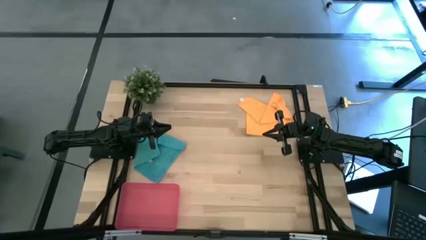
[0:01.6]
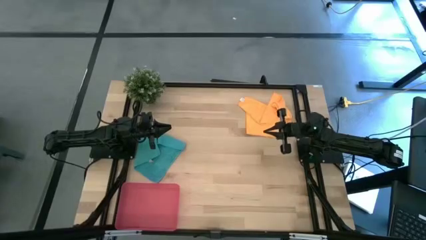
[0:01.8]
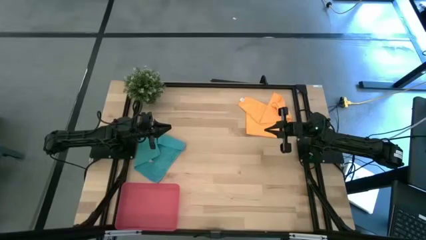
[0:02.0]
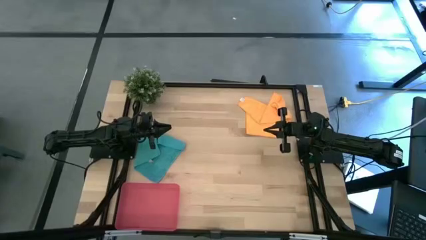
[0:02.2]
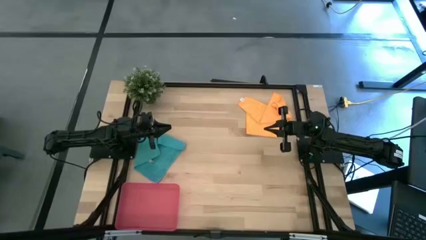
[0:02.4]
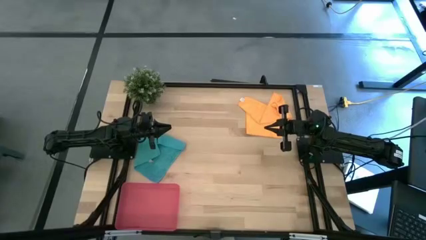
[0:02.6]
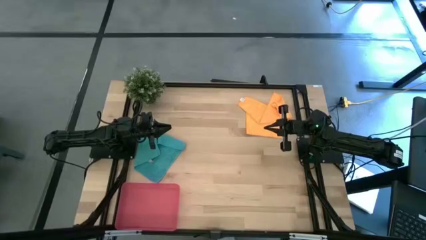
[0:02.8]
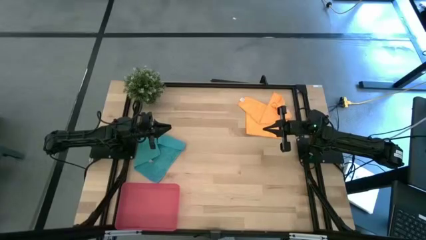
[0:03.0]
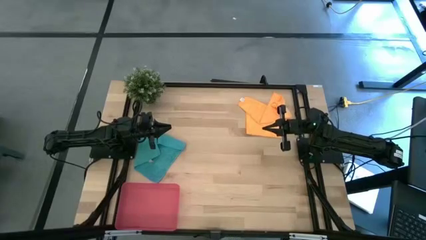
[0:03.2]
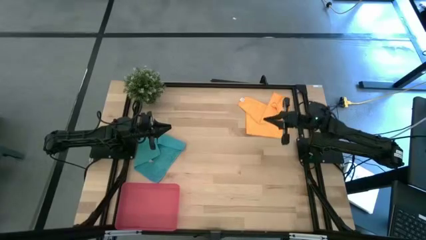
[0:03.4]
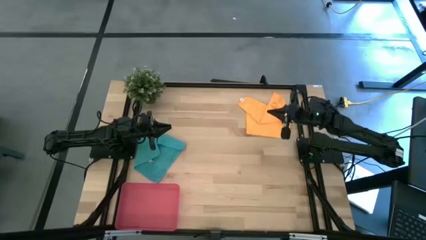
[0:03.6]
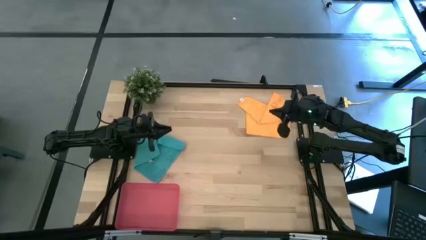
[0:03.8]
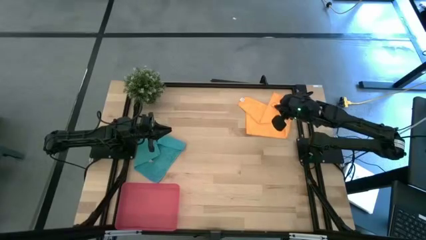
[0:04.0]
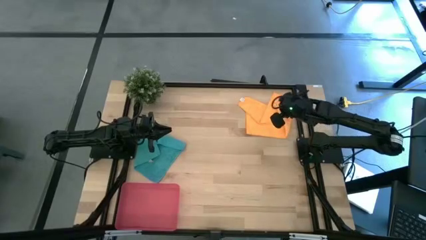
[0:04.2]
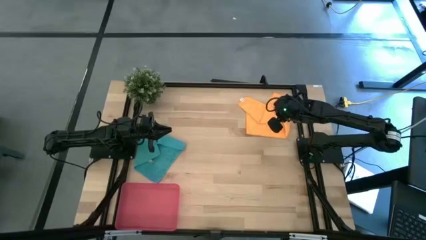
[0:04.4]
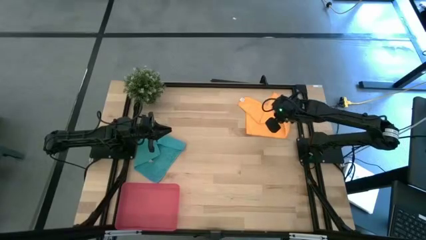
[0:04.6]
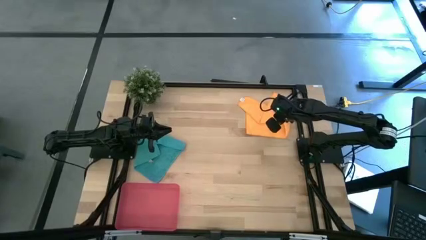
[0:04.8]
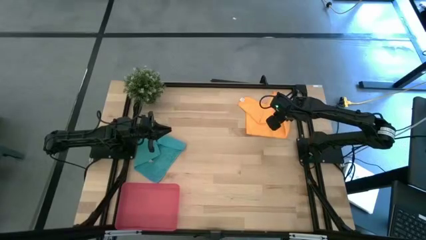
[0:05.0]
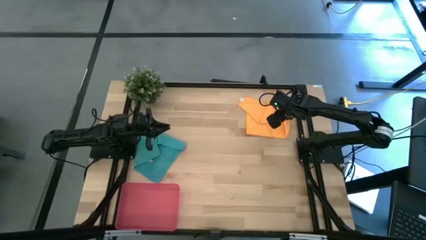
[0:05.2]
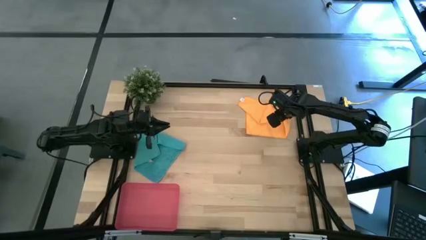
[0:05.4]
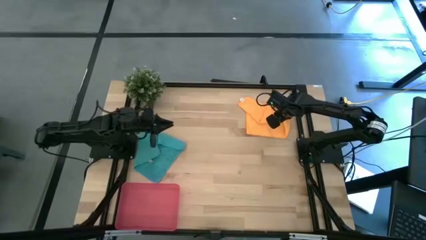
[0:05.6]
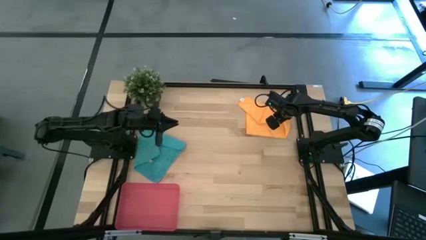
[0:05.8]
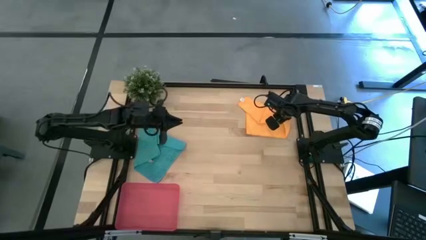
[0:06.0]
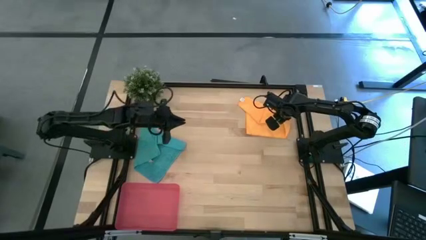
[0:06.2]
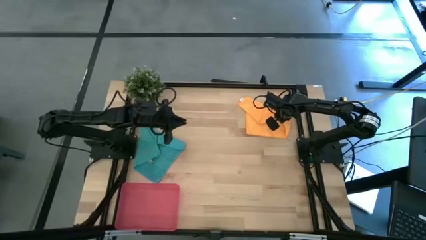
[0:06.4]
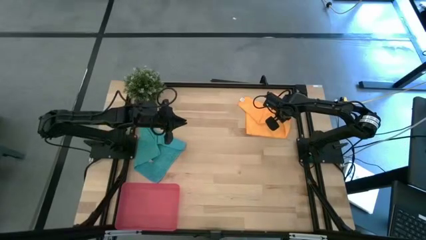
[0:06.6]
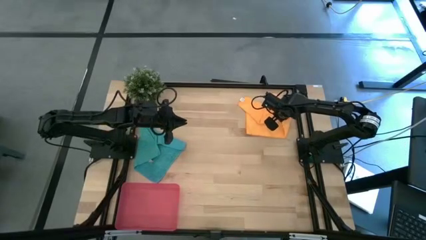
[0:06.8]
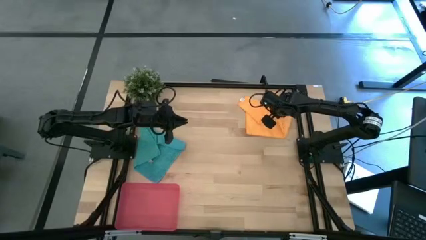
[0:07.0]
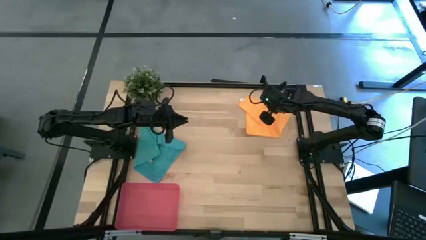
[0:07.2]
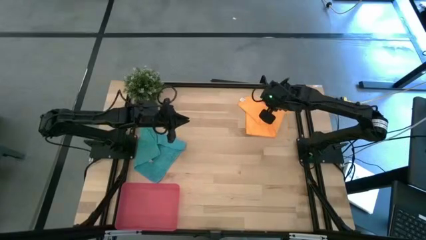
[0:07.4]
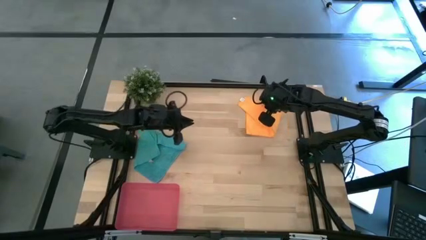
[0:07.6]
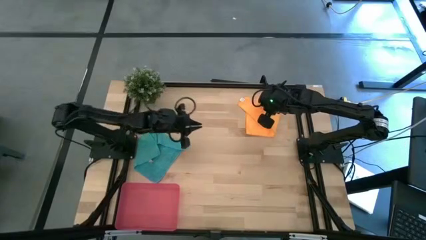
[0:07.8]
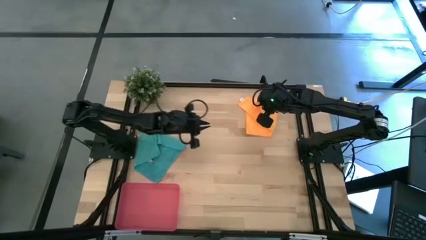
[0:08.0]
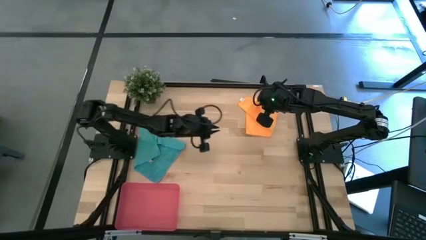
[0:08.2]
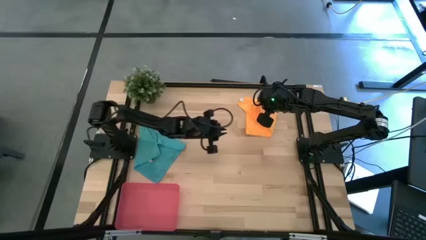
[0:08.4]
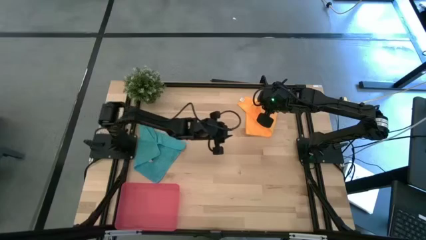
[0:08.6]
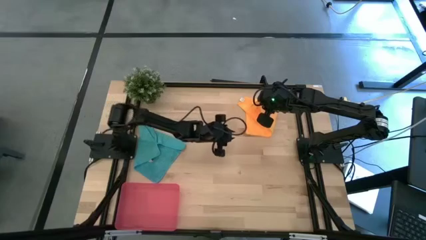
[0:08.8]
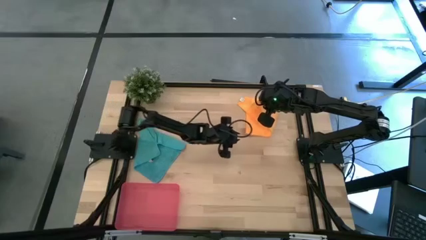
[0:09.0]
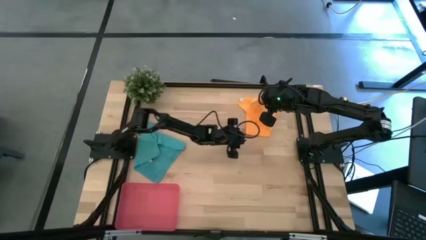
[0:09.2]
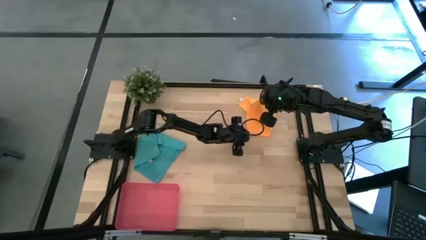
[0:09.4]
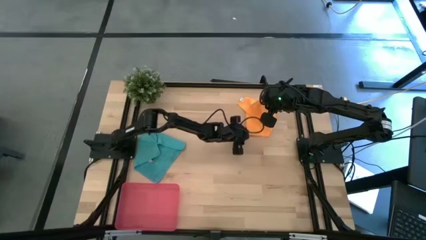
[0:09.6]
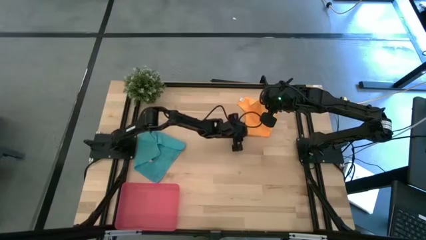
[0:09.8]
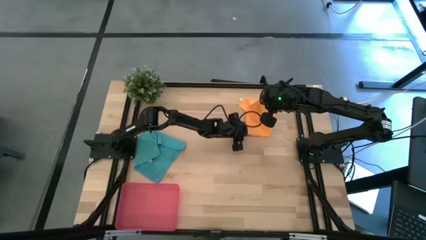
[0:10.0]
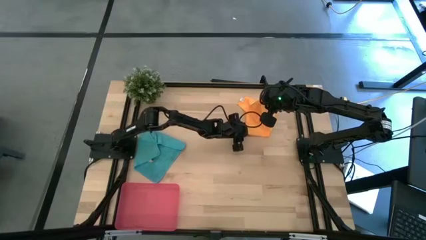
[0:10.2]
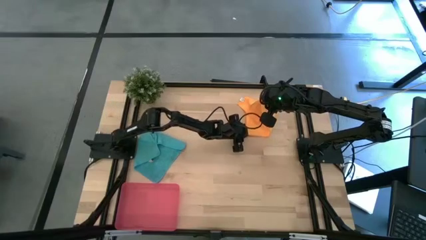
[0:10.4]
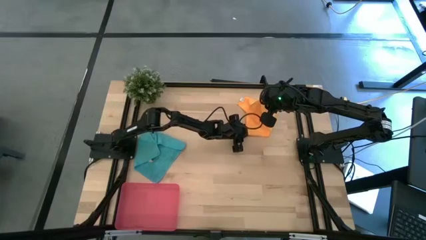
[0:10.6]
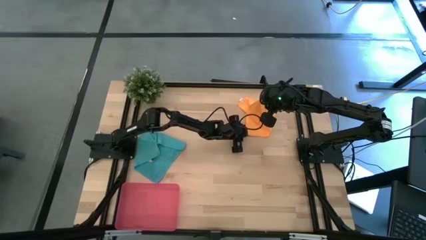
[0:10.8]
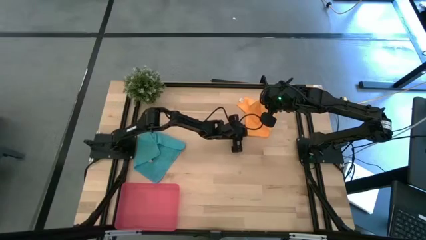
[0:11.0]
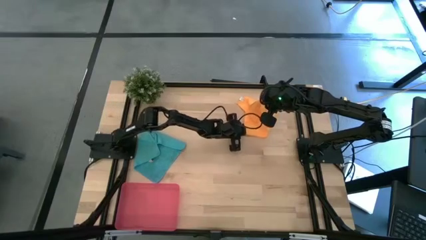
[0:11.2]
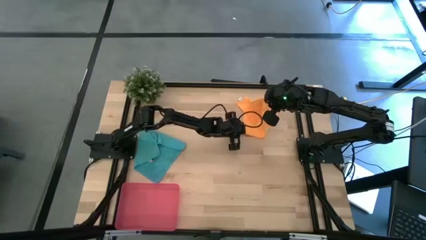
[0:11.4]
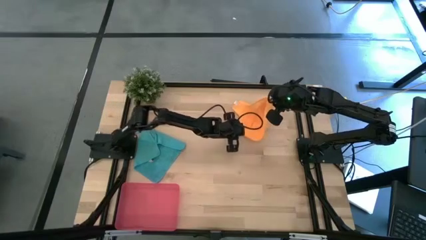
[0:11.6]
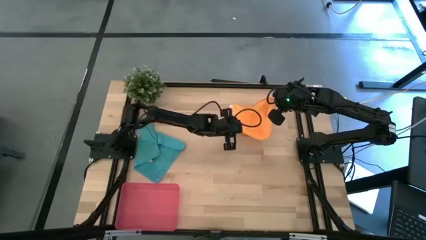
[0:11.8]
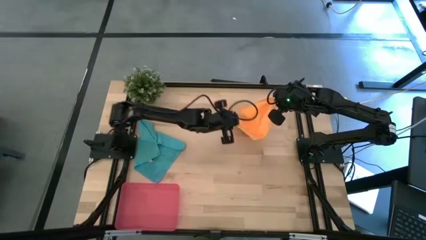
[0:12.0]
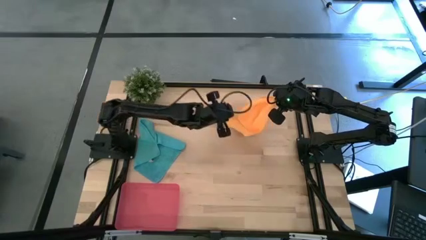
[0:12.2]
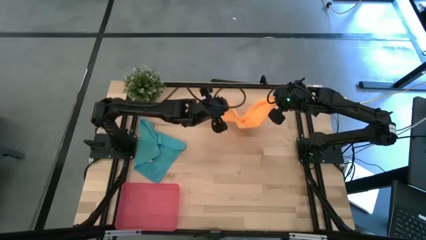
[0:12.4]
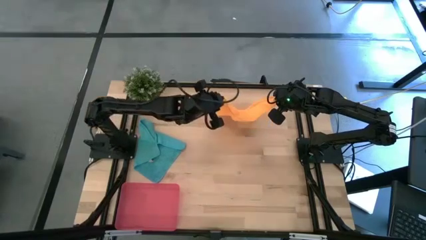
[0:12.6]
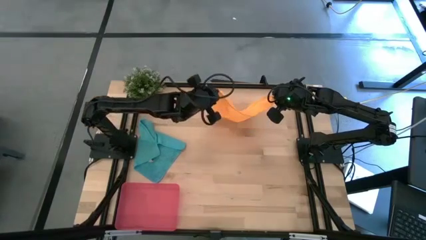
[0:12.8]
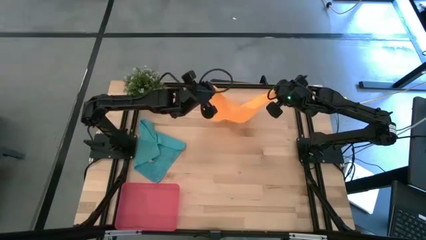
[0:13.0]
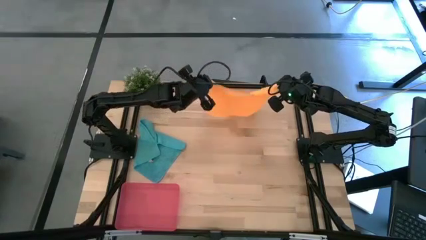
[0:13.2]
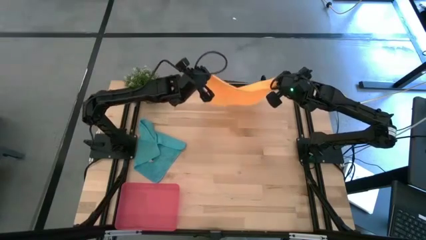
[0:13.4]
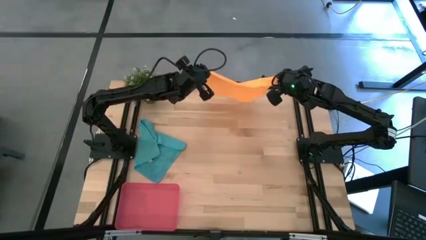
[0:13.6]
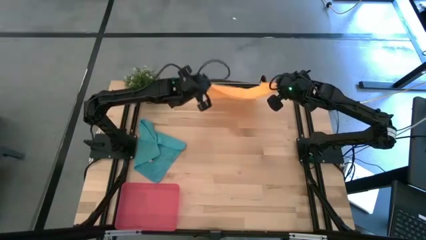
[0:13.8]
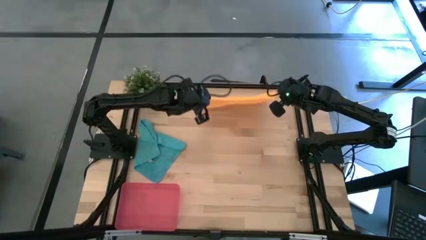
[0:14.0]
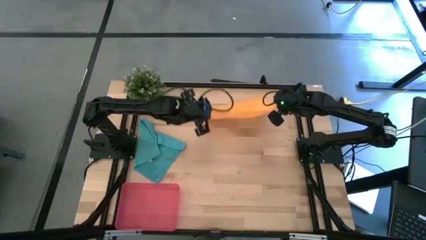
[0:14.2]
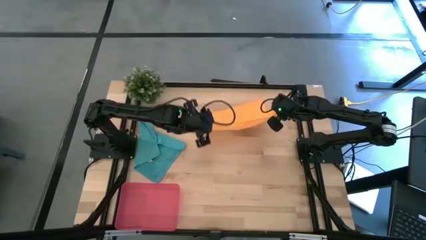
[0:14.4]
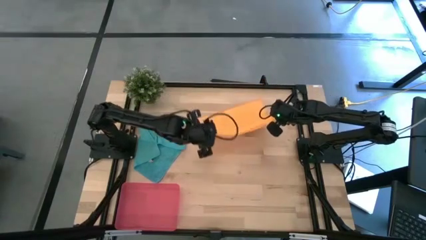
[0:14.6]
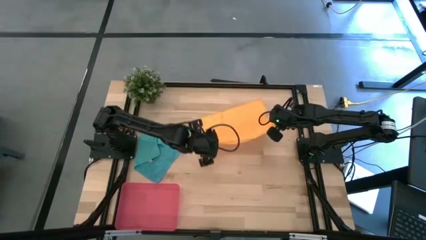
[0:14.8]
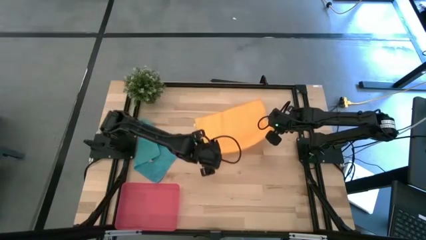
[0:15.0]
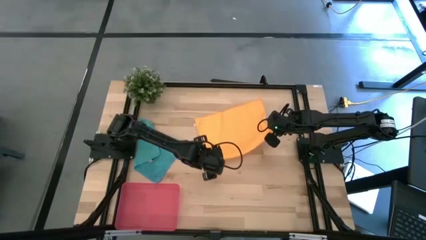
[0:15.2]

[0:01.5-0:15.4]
Task: Roll microfiber towels into tight, uniform cylinder then place into a basket
Fold the yellow microfiber cloth
